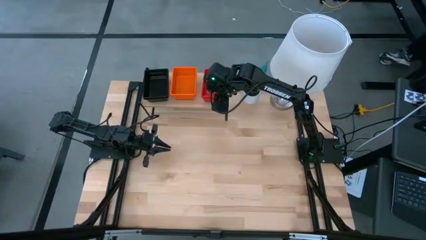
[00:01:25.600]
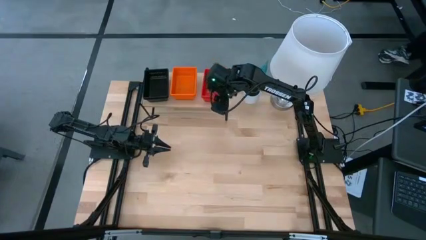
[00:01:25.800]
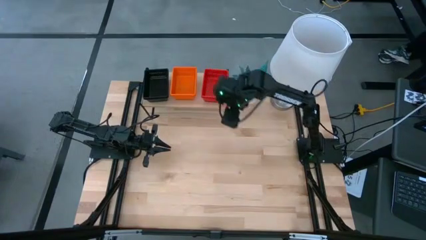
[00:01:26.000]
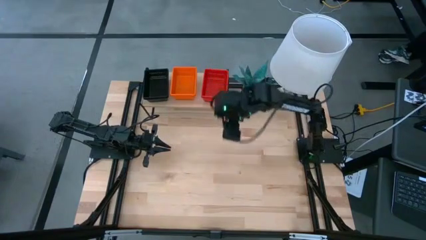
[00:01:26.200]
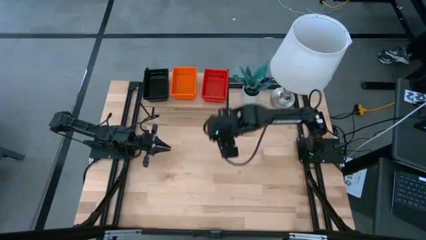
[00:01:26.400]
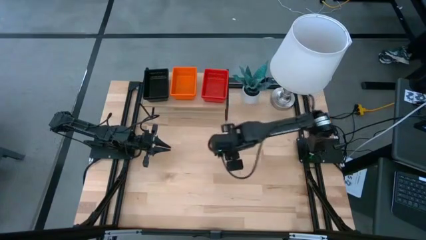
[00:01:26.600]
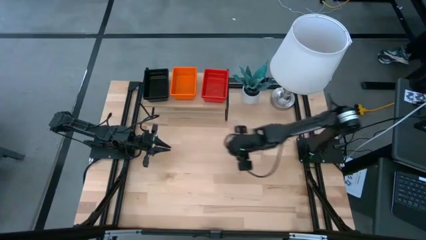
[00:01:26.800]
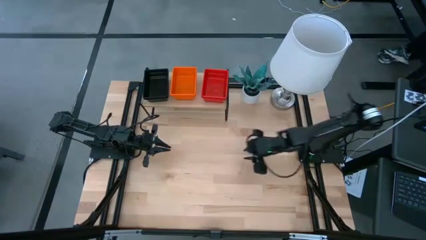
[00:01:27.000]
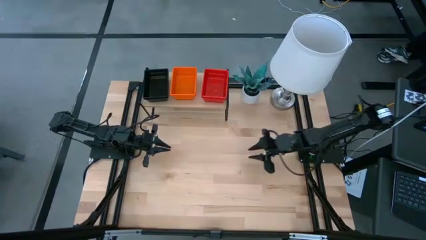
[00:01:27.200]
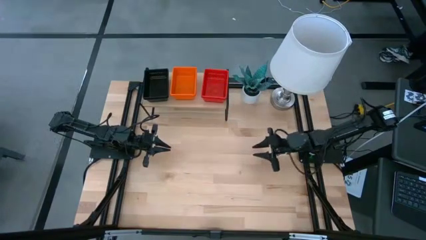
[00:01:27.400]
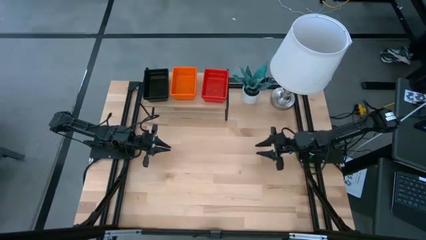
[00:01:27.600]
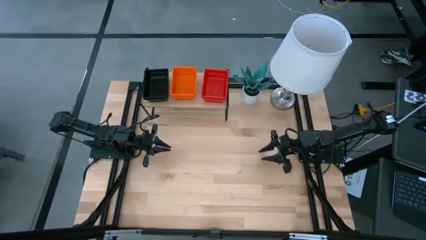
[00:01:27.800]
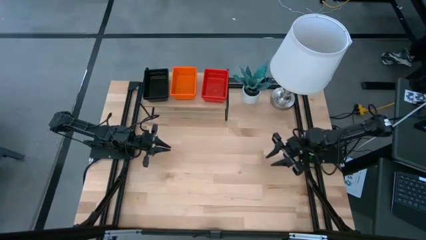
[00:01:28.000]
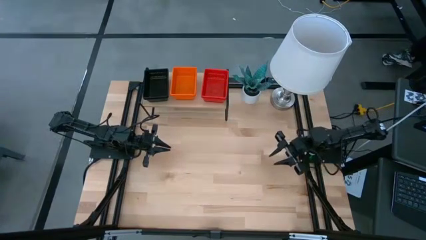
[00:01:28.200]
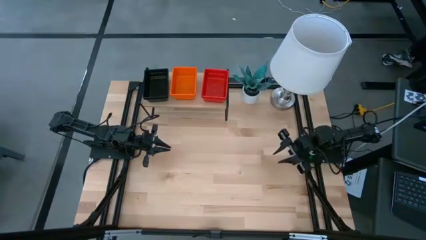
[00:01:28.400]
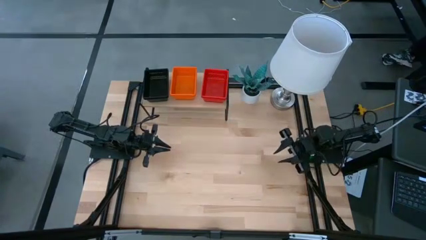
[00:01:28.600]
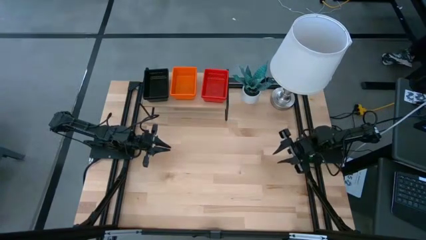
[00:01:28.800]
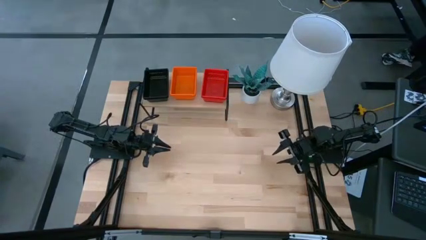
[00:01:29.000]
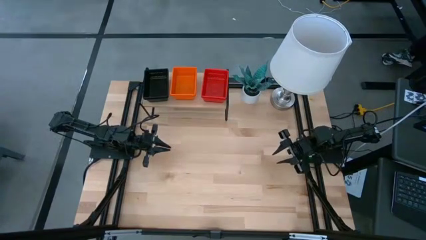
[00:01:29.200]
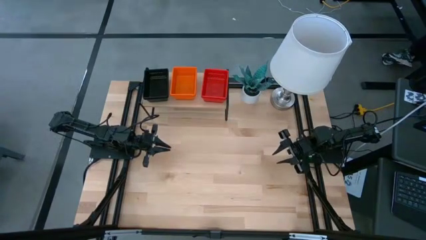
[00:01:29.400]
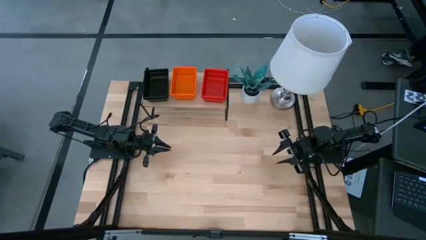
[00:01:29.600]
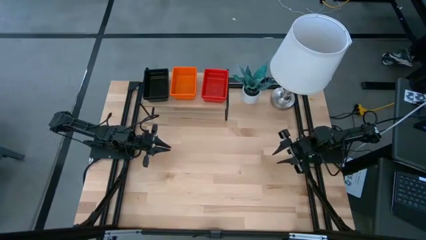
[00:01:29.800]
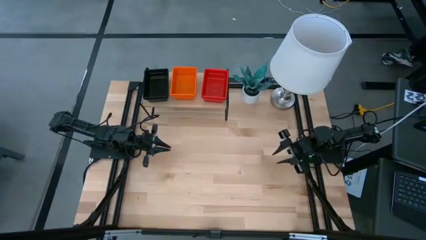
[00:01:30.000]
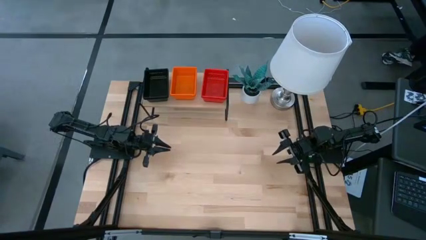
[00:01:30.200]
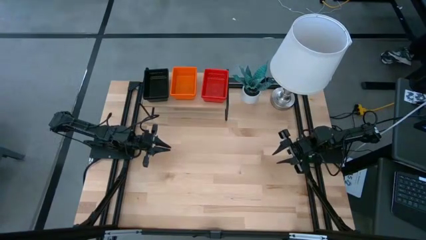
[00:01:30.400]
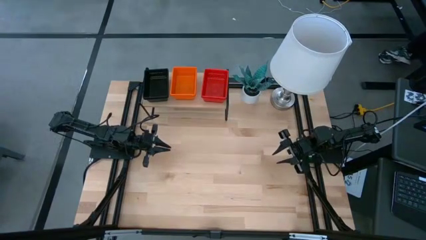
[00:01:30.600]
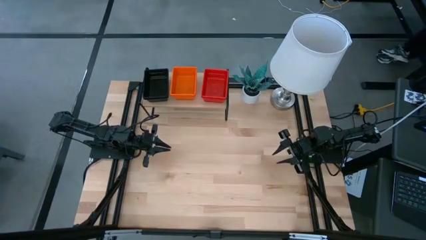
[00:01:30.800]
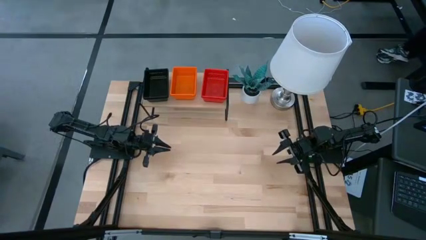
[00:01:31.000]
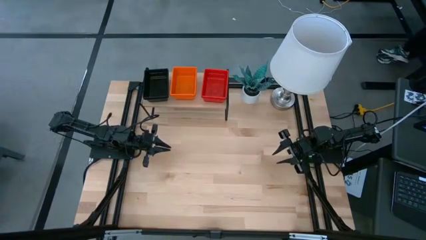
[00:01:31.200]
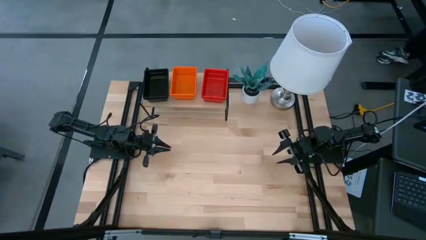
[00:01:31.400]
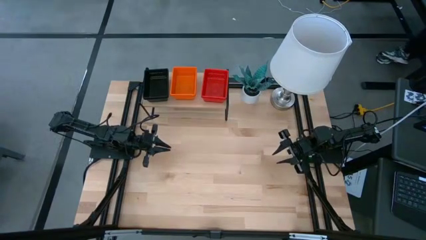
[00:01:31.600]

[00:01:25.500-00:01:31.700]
Task: Stack baskets on shelf by color
Return to Home Position

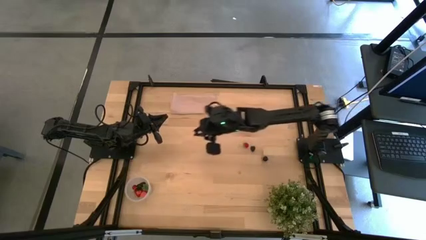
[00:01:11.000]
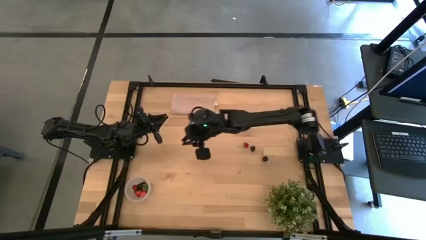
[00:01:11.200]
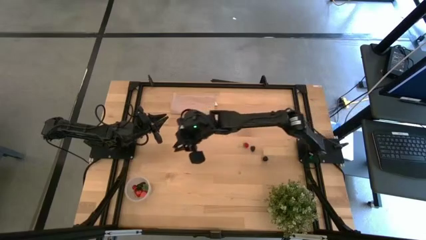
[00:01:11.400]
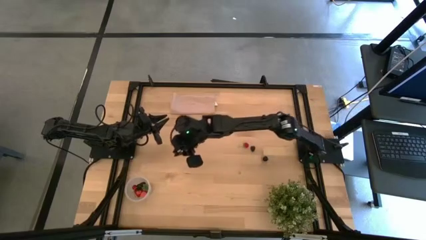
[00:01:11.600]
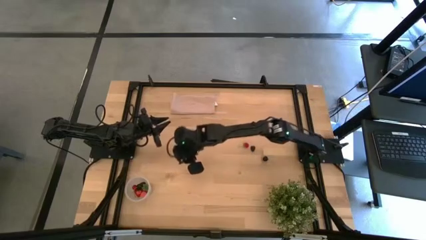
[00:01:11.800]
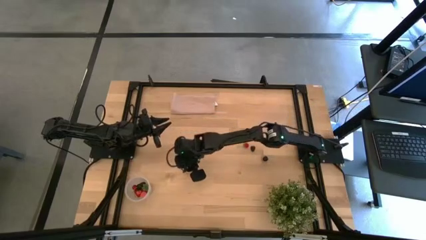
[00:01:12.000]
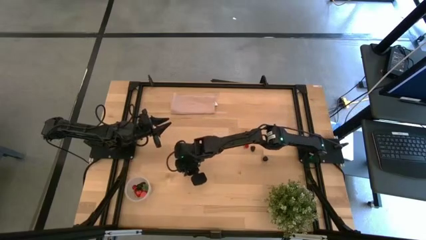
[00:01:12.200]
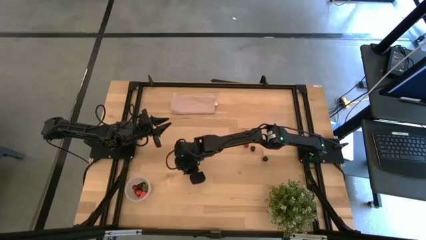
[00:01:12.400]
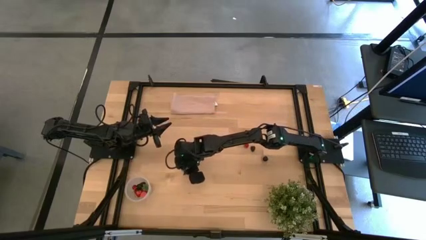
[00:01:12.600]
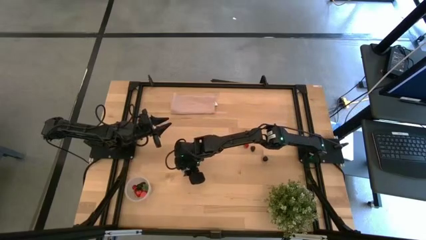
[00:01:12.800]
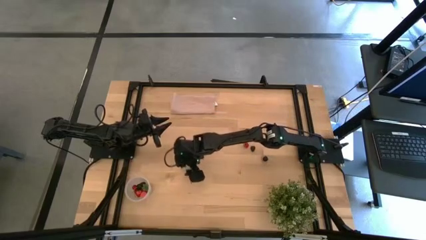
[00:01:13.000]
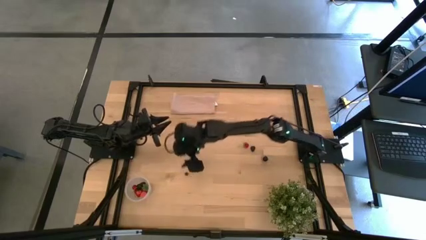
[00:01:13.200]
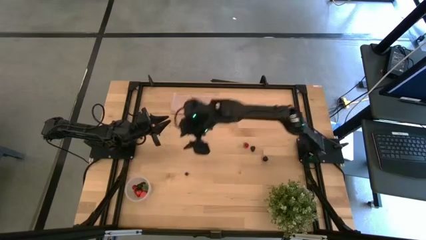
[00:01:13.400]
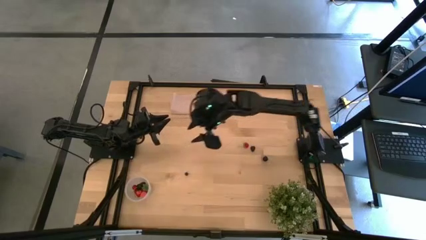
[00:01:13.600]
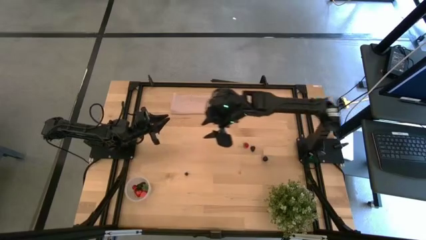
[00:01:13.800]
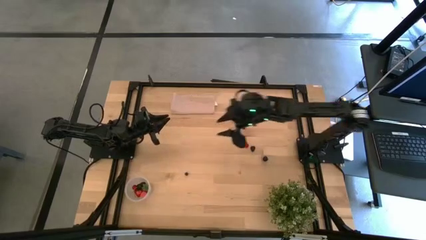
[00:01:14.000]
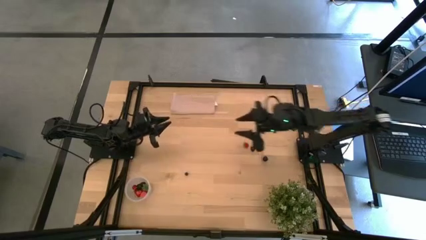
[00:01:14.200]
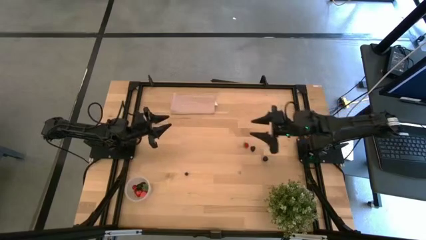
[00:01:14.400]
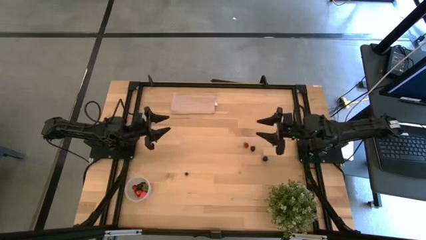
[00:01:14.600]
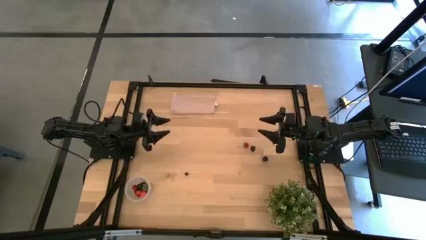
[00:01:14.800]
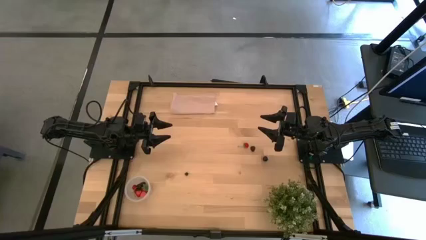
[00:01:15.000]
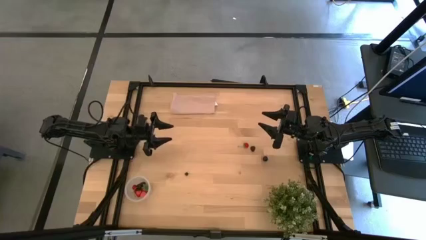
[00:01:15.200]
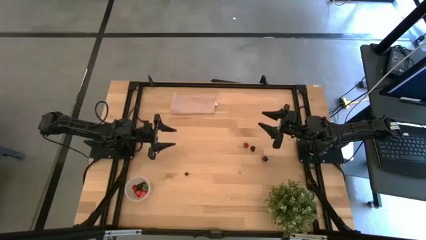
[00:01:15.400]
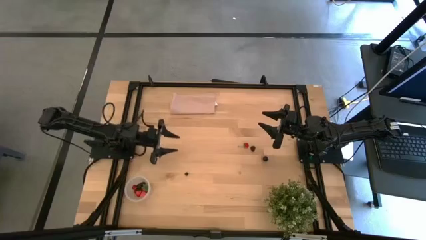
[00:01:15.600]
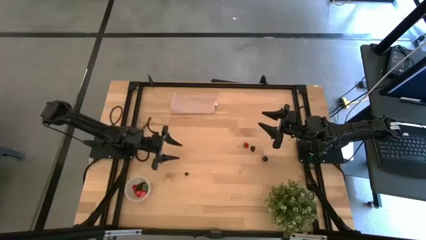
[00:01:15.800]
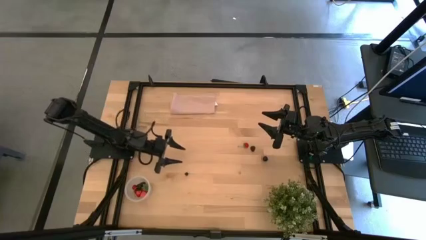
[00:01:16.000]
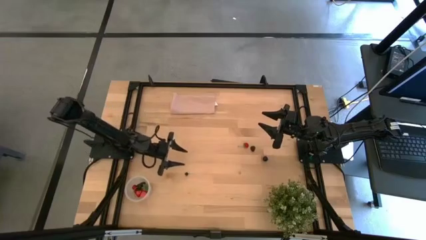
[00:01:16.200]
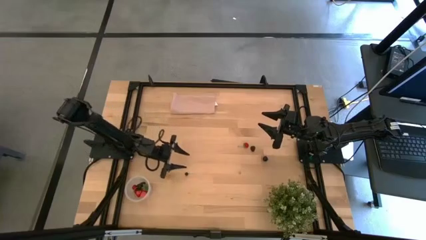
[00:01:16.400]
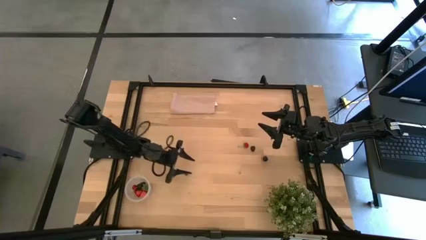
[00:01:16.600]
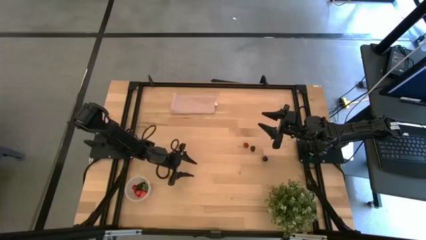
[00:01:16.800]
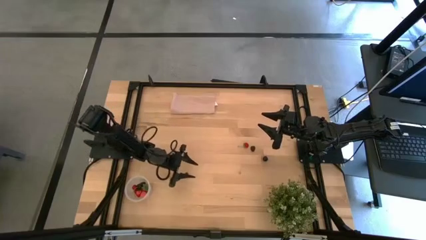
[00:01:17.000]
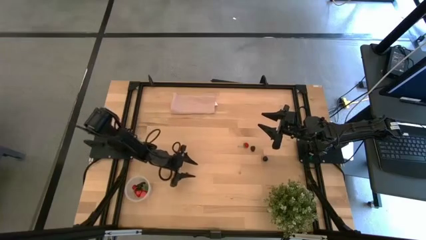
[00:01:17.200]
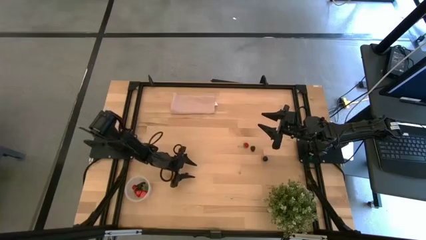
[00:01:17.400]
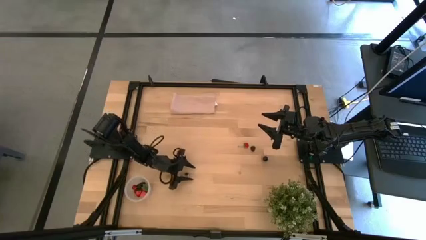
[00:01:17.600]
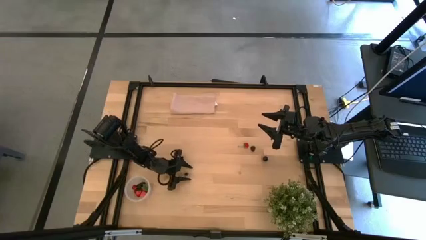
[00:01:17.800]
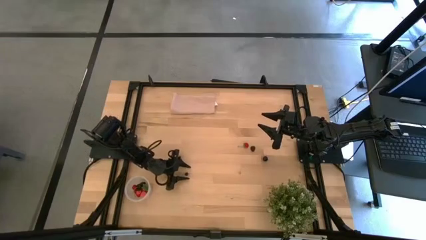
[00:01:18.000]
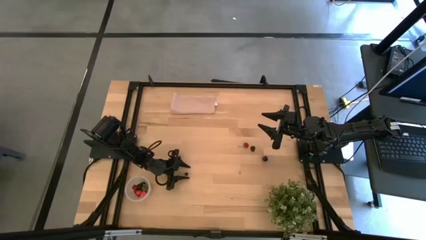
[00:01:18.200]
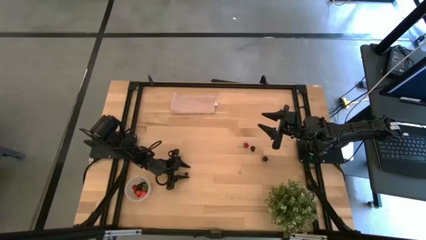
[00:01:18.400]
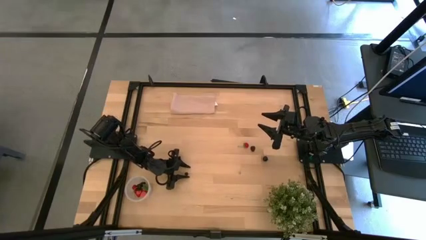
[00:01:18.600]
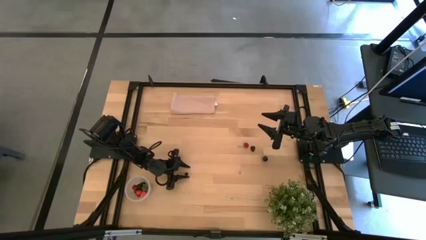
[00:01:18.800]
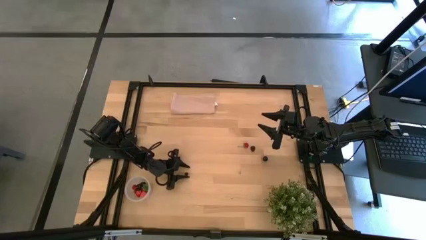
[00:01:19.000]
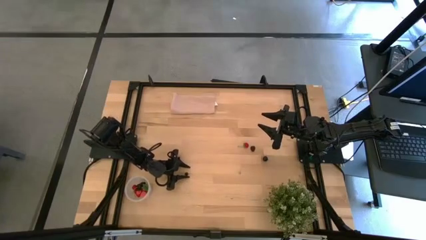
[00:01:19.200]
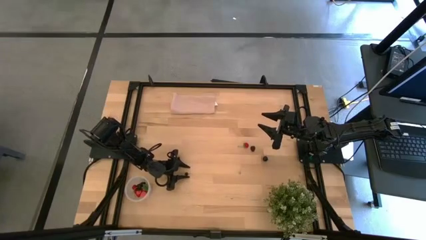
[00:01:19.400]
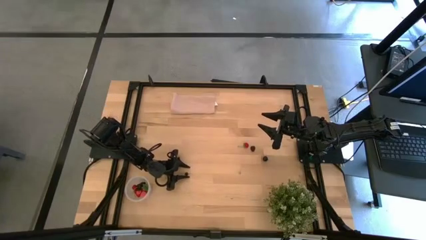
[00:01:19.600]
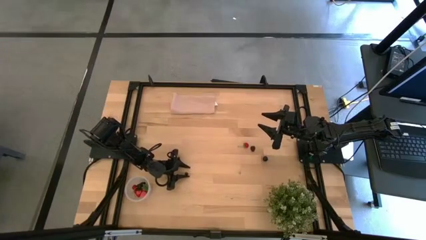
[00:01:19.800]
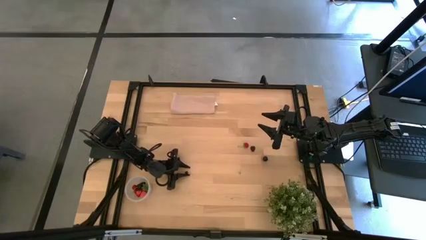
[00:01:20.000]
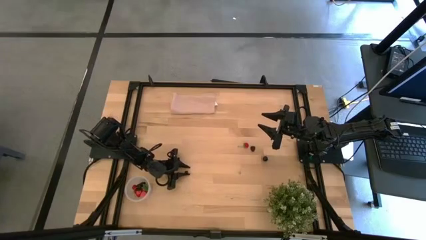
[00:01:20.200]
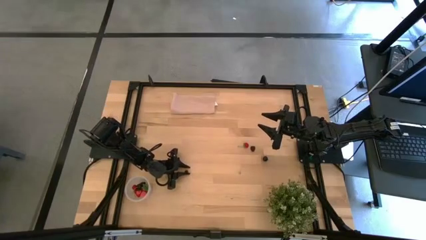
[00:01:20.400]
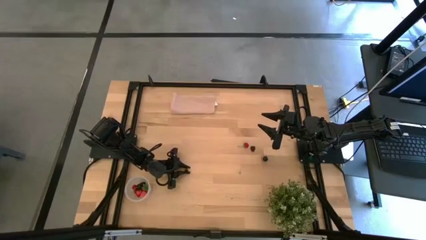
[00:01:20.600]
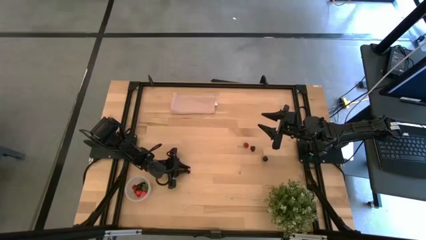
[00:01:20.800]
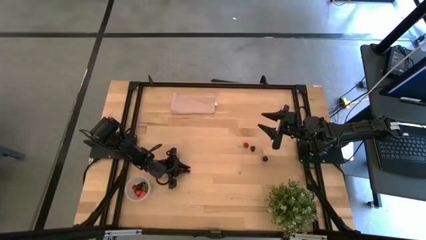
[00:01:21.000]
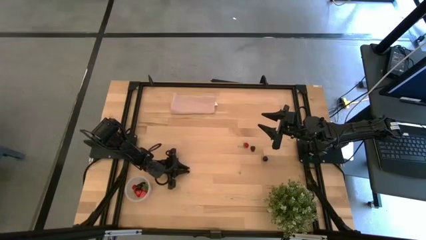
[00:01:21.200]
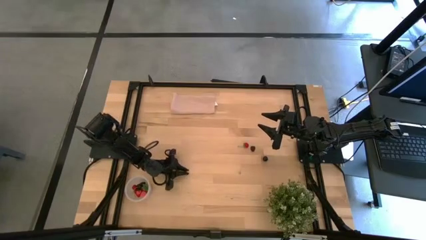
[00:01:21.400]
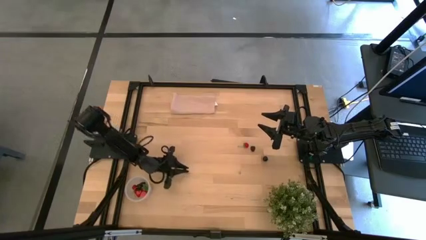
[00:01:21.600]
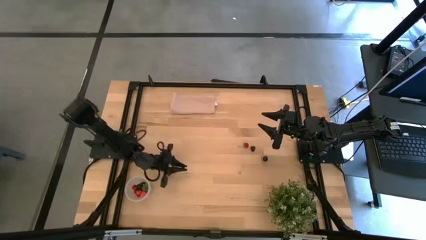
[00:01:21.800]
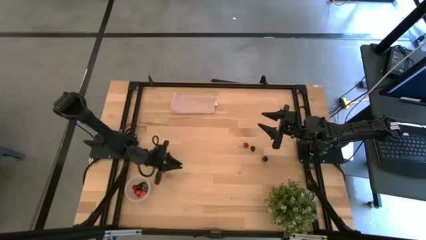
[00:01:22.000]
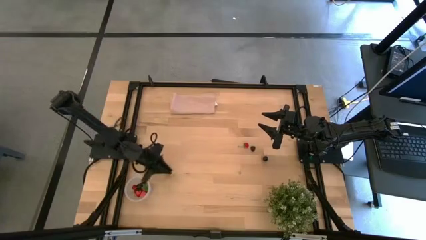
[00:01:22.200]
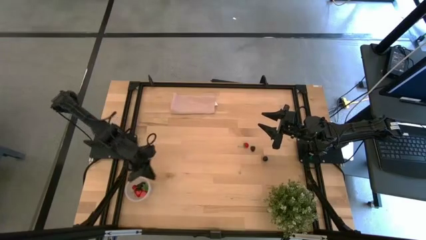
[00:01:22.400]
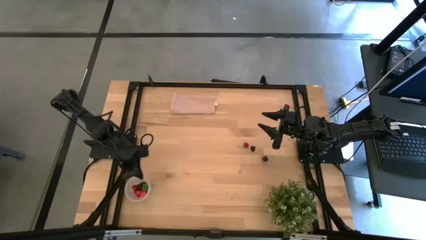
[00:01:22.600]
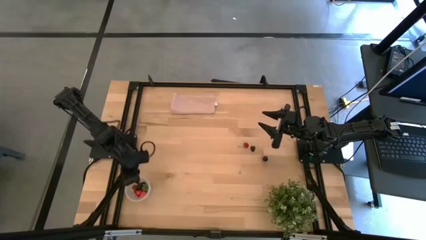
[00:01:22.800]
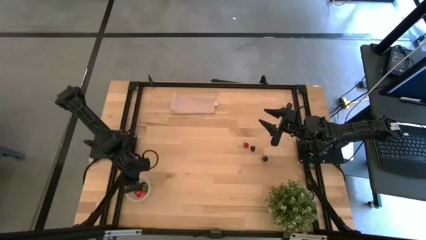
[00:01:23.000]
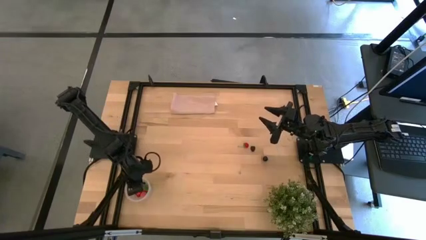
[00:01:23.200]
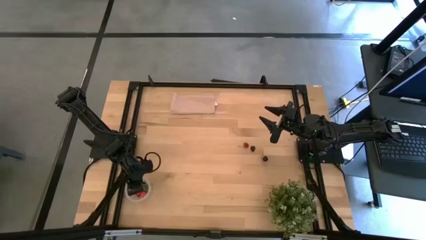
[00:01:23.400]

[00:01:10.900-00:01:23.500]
Task: Pick and placing Produce into tupperware
Put the blueberry into the transparent bin
